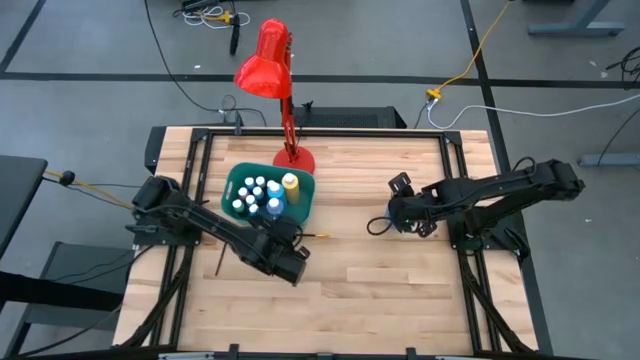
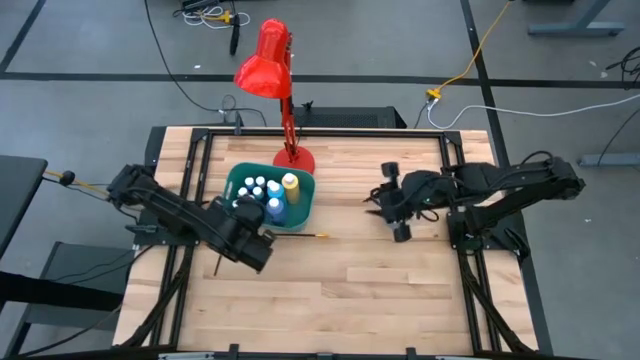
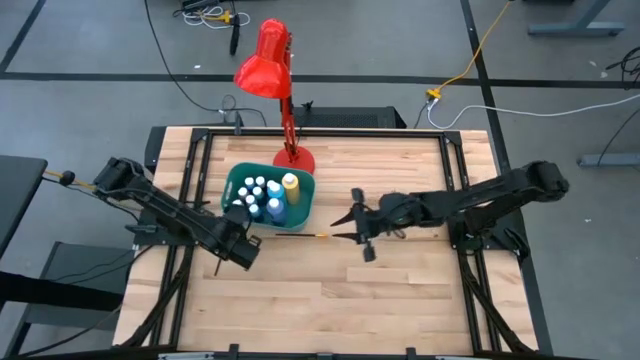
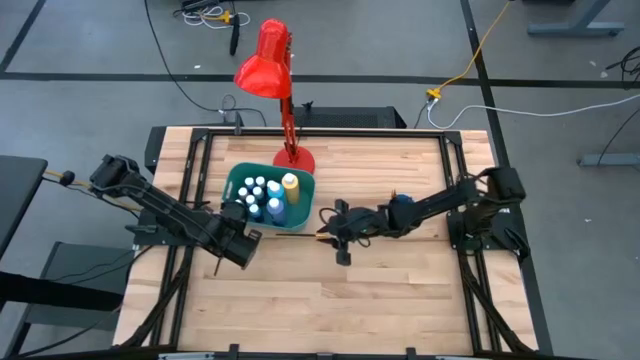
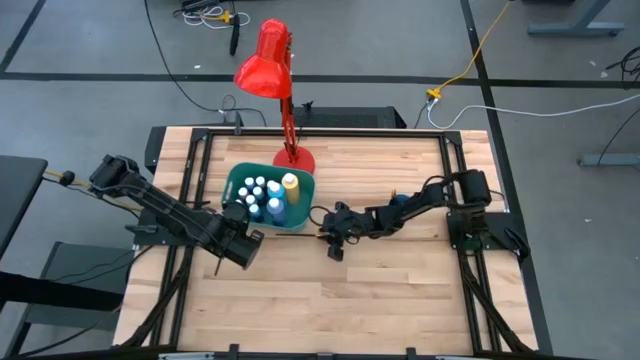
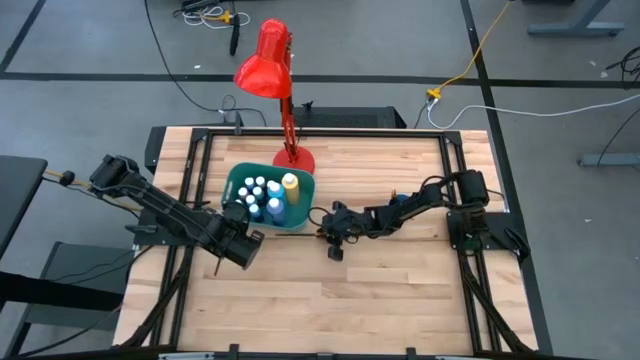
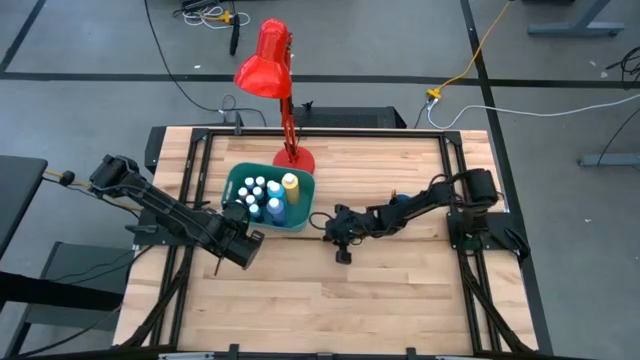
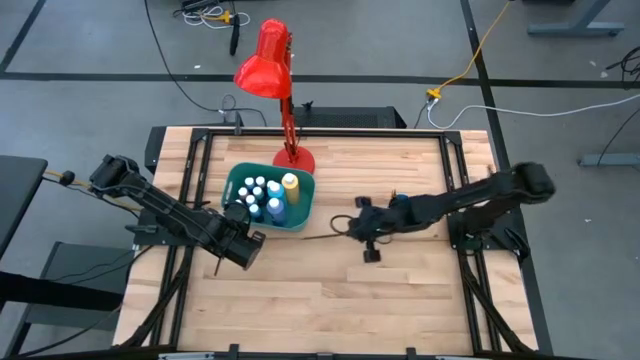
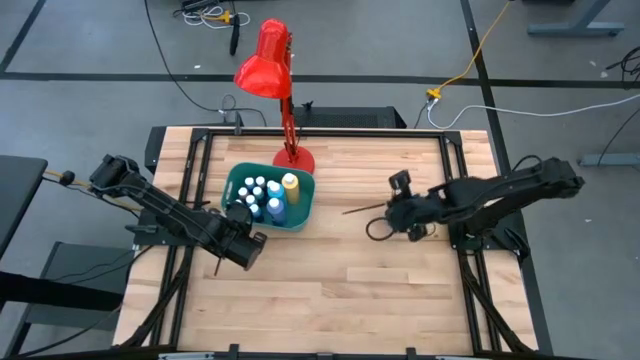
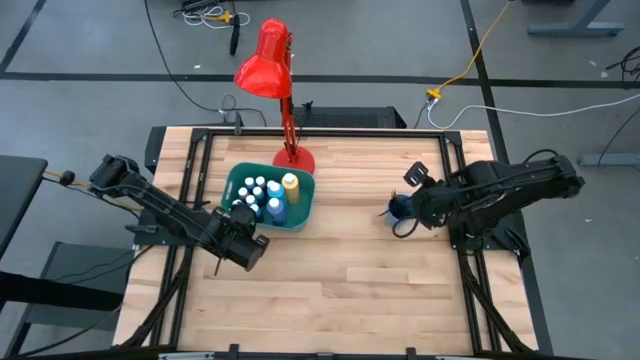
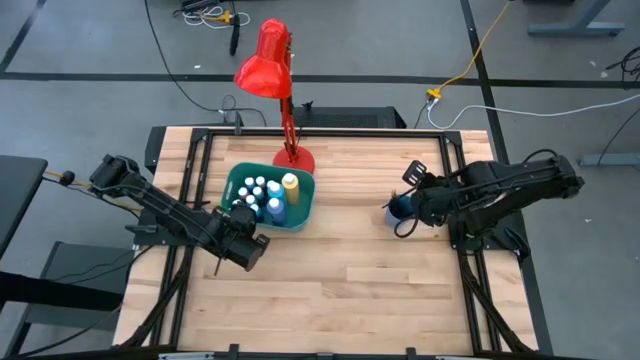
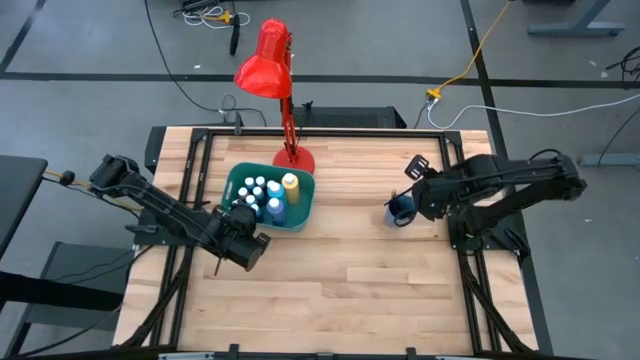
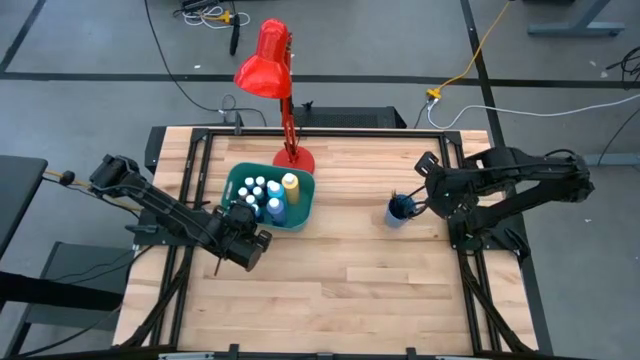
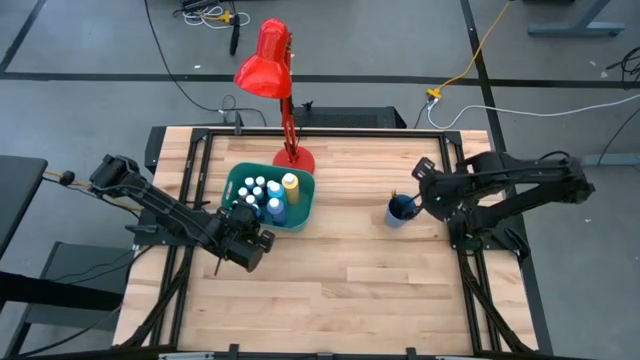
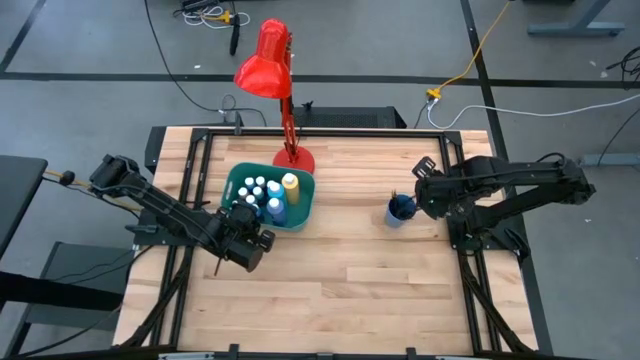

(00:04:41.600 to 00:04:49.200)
Task: Pick & Place Paint Supplies
Put the black gold paint brush into the blue cup

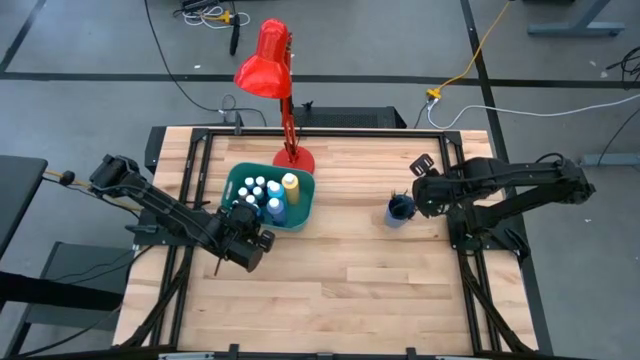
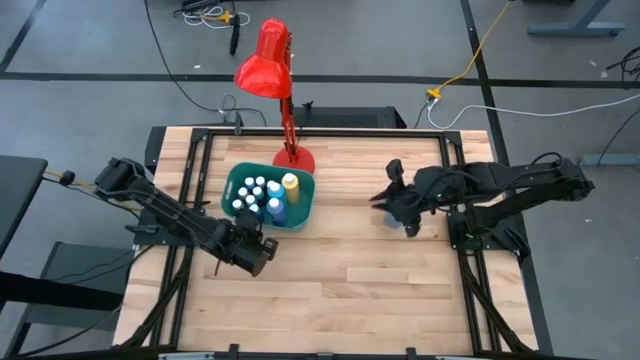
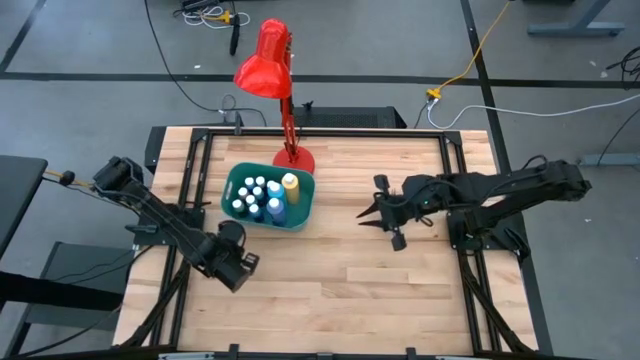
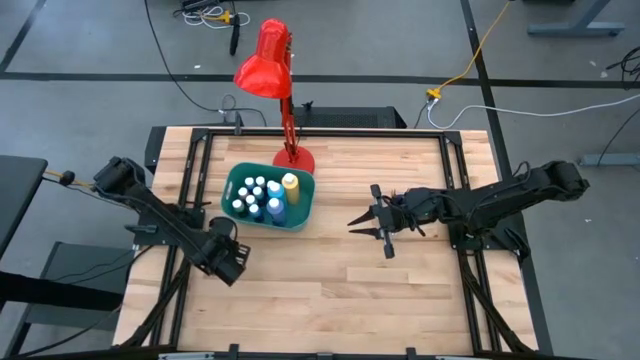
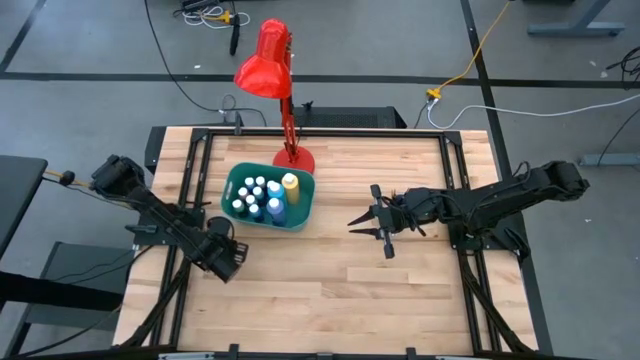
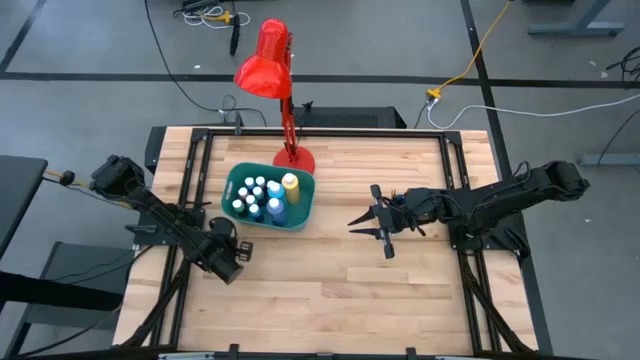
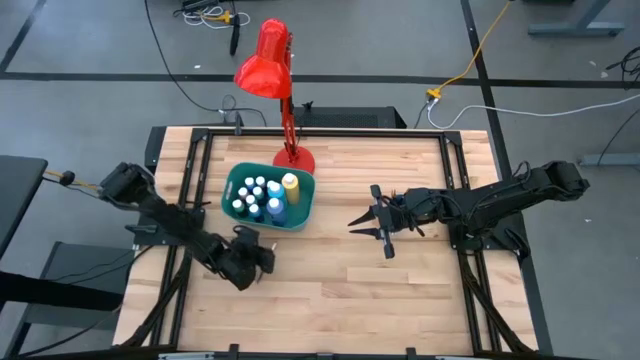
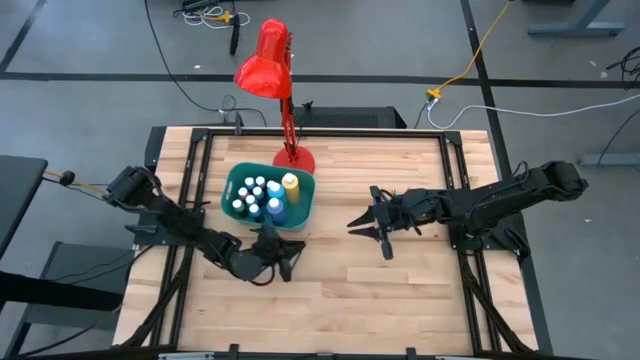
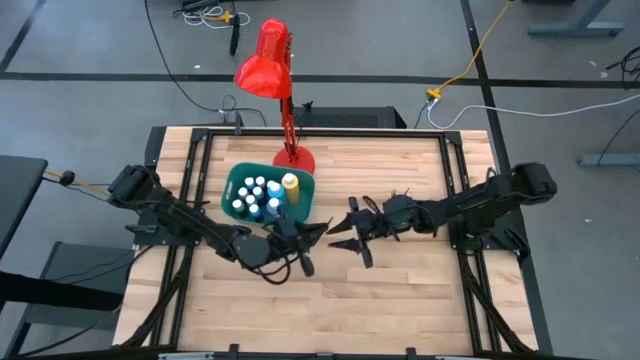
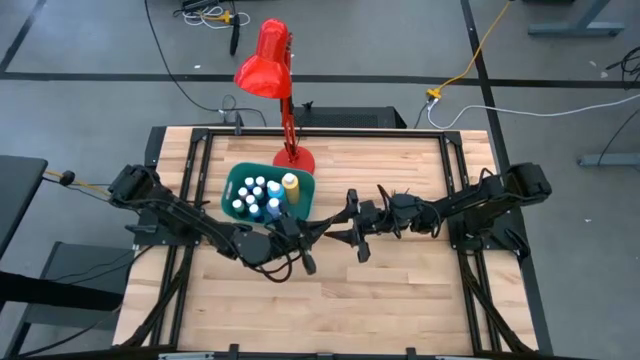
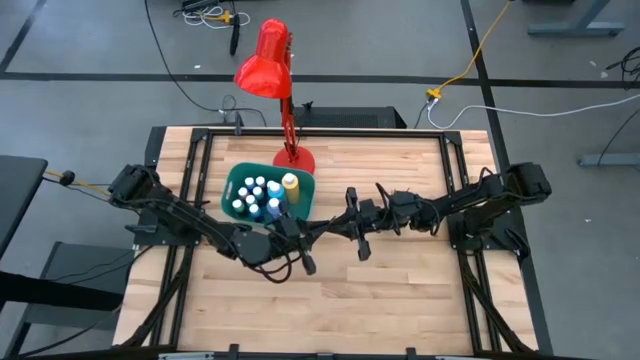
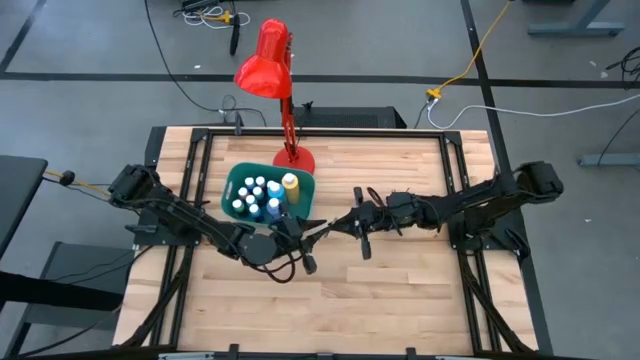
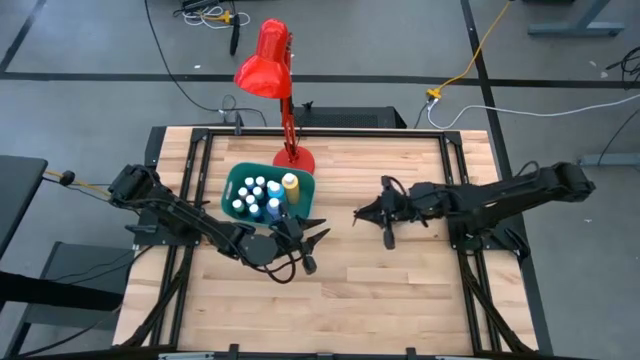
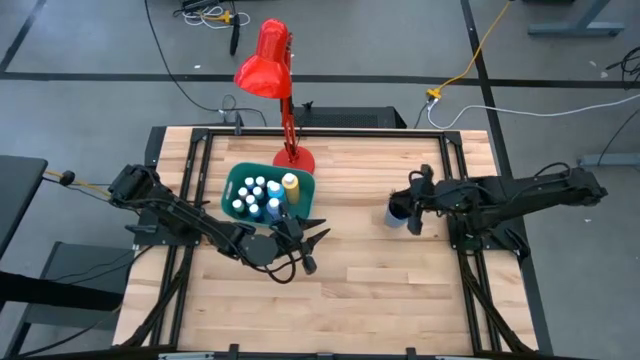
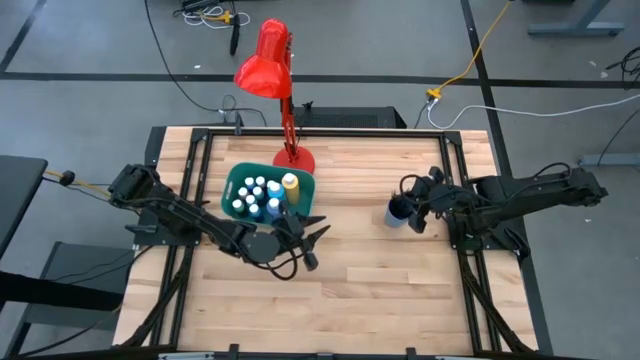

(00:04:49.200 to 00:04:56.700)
Put the black silver paint brush into the blue cup

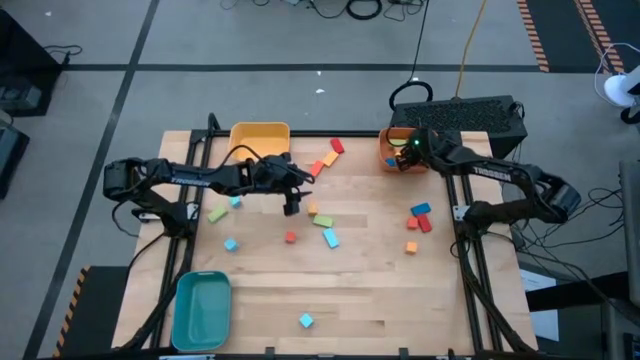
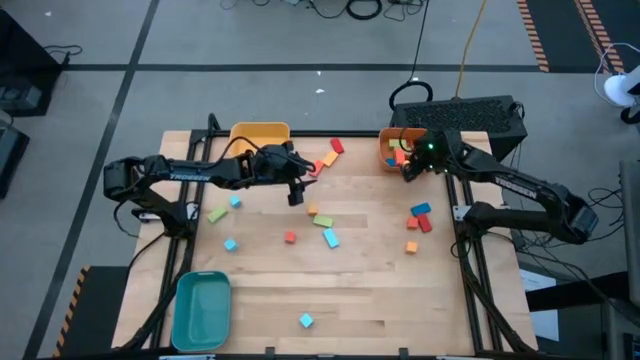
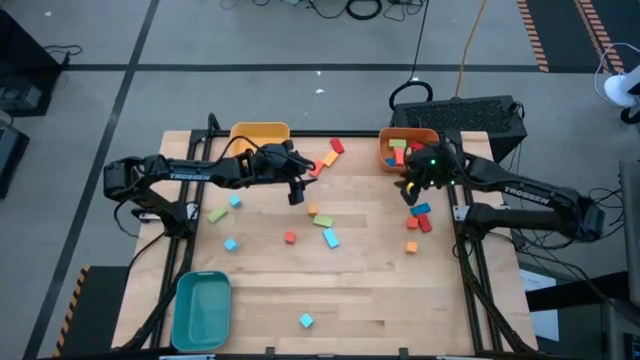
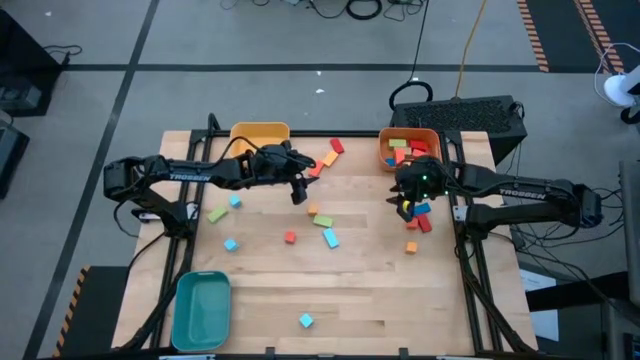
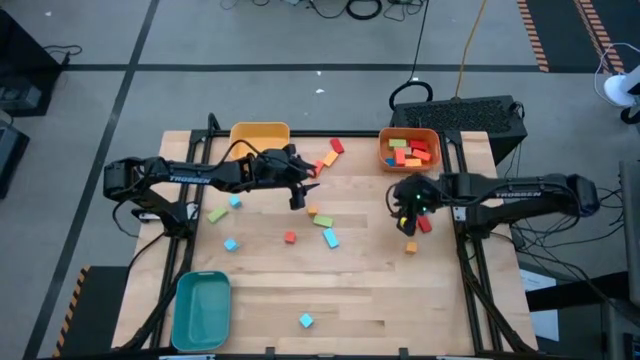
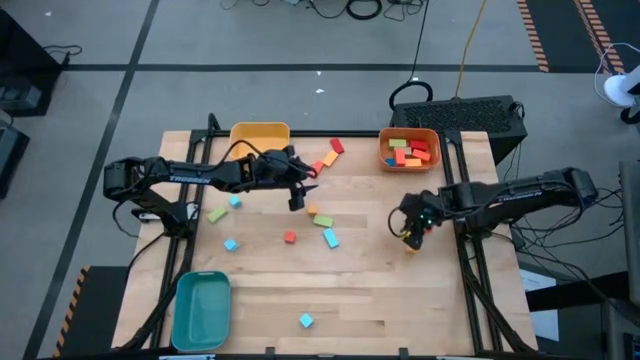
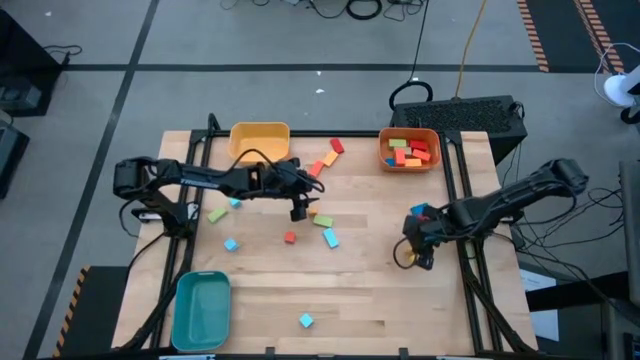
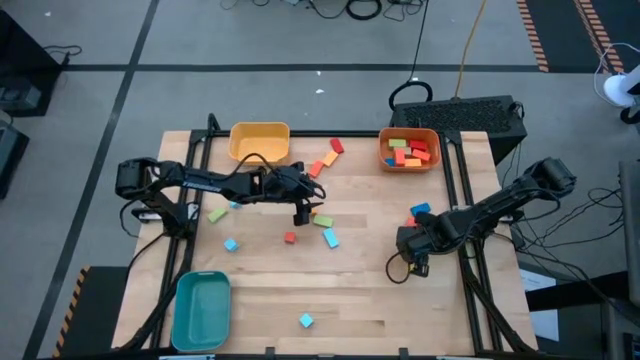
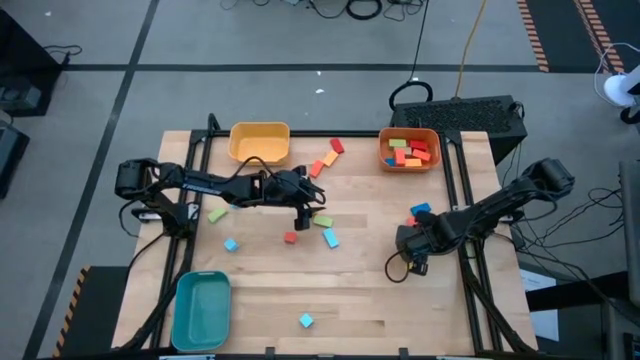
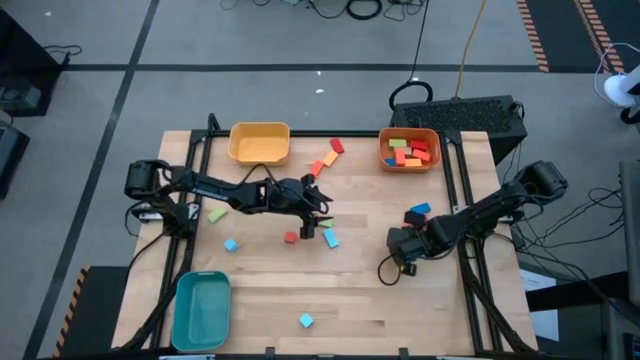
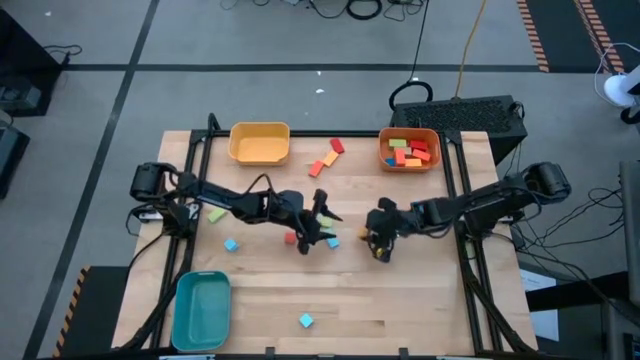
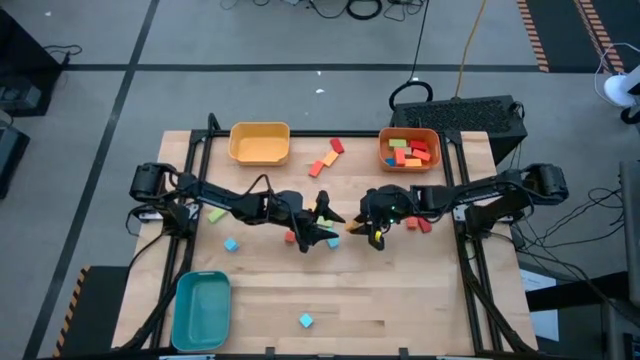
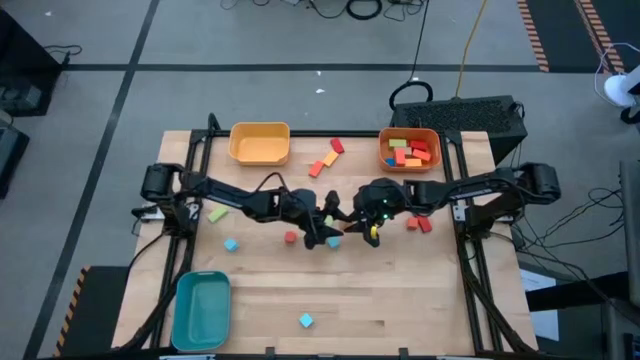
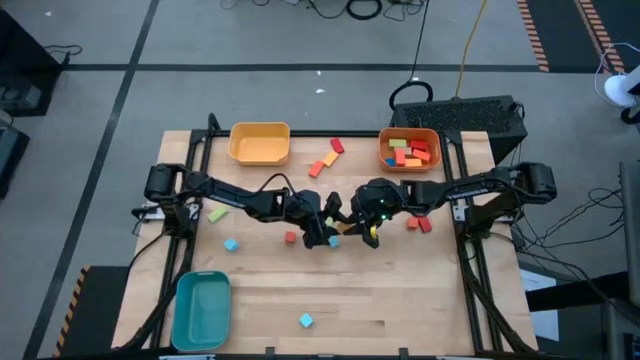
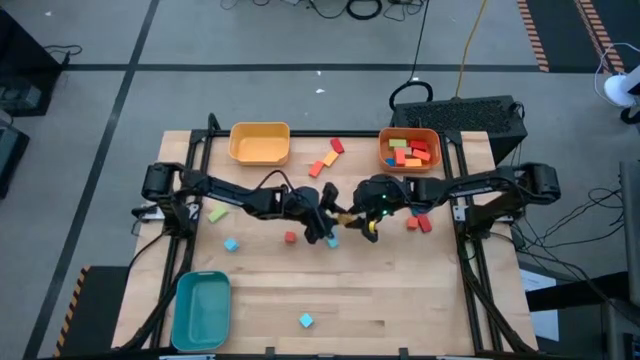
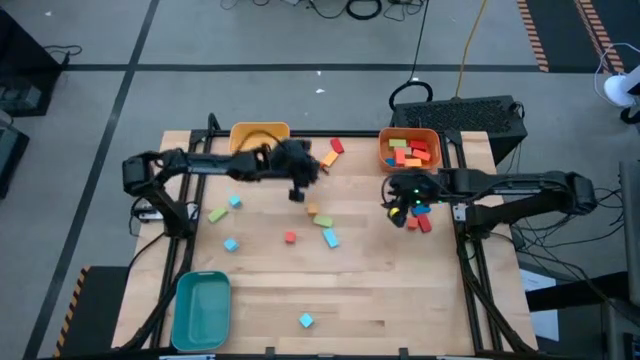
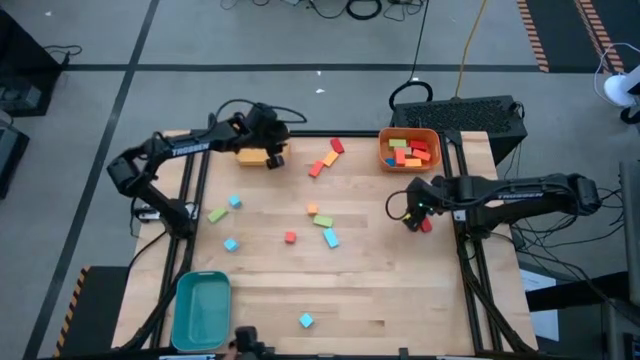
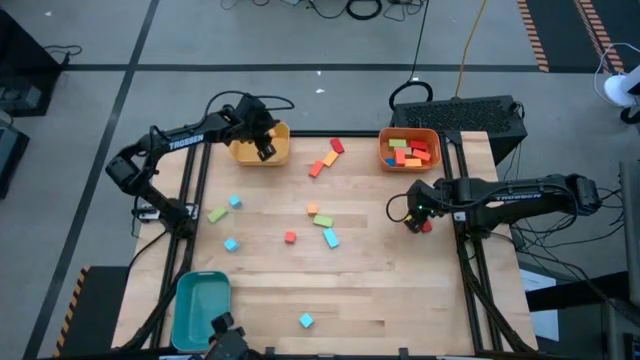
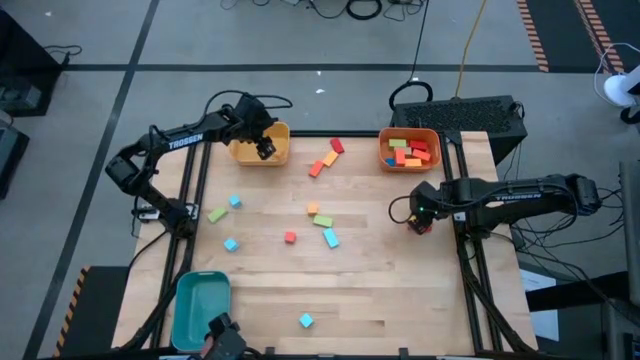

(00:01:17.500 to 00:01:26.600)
Task: Sort blocks by size
Put the small yellow block into the yellow bin
